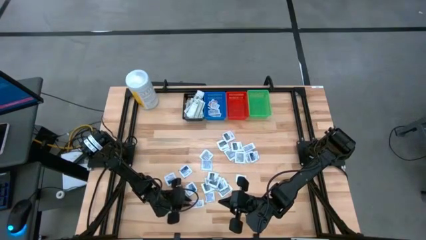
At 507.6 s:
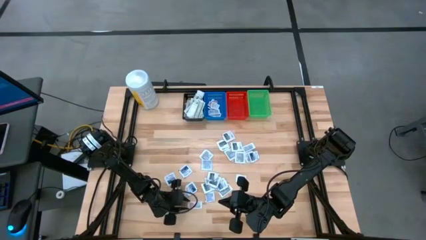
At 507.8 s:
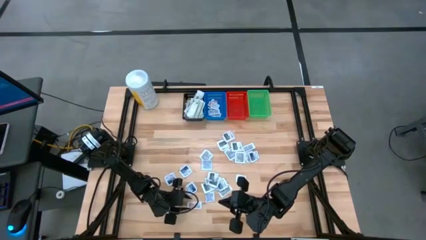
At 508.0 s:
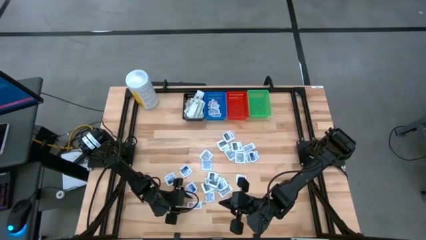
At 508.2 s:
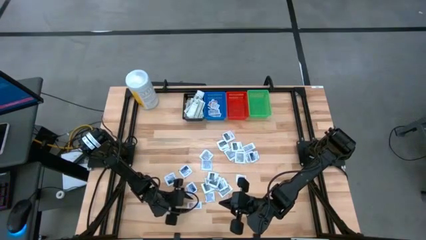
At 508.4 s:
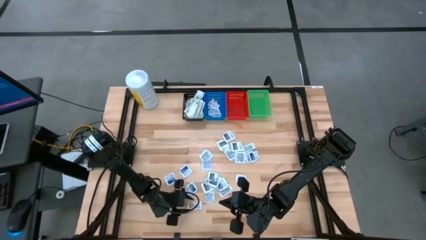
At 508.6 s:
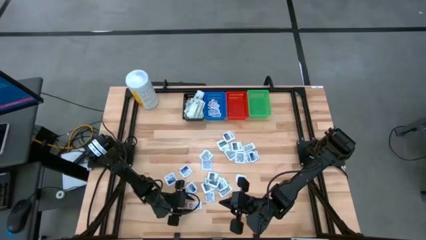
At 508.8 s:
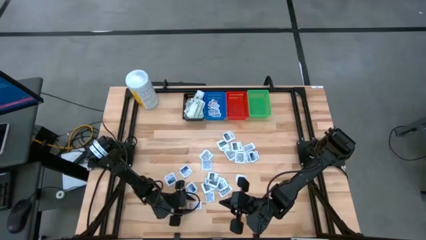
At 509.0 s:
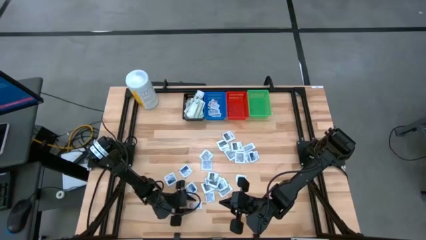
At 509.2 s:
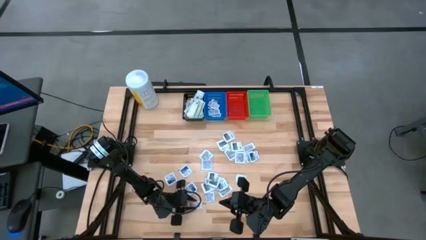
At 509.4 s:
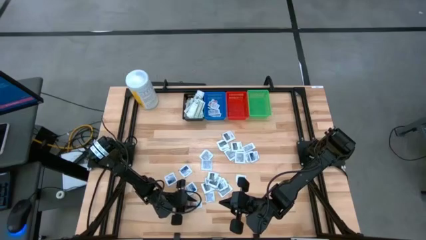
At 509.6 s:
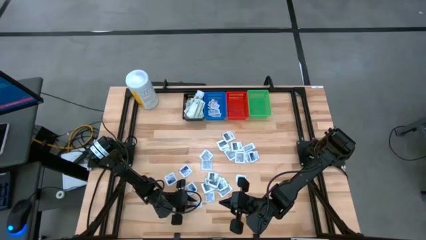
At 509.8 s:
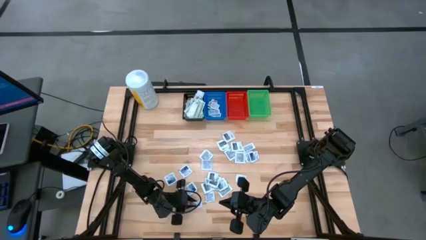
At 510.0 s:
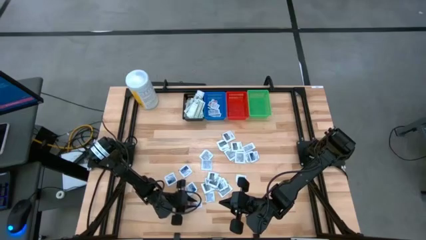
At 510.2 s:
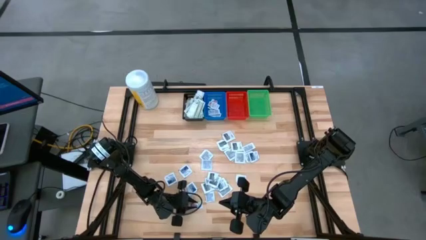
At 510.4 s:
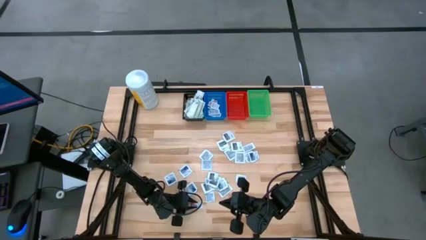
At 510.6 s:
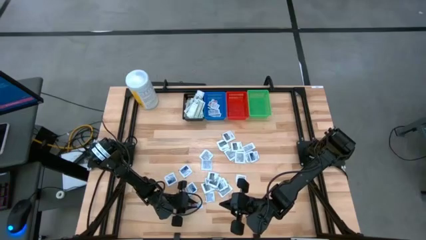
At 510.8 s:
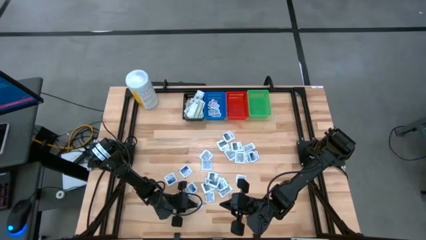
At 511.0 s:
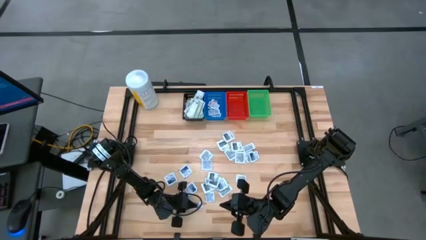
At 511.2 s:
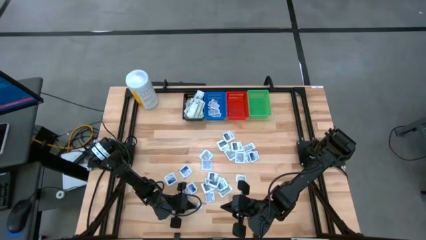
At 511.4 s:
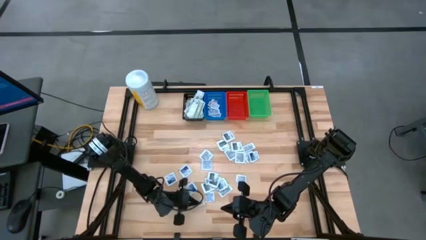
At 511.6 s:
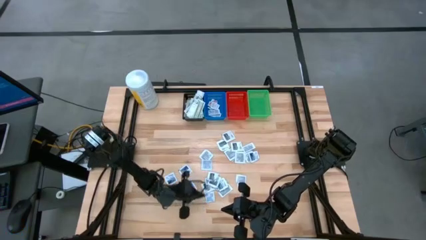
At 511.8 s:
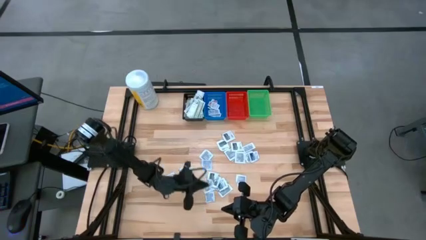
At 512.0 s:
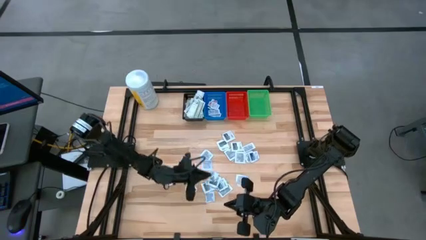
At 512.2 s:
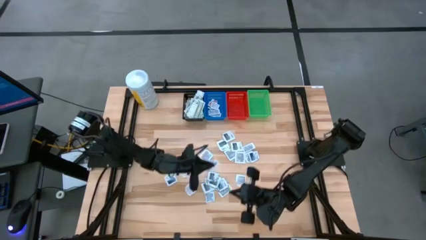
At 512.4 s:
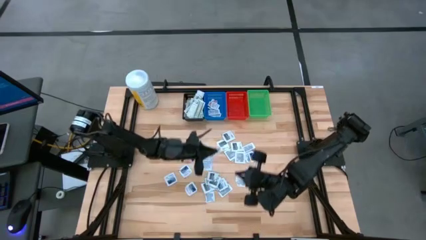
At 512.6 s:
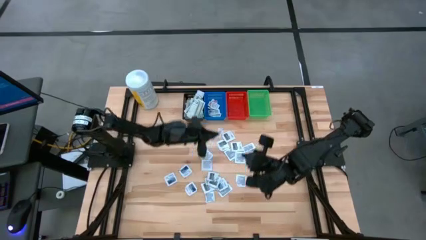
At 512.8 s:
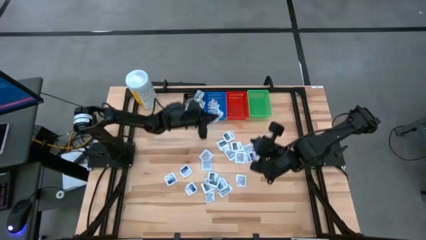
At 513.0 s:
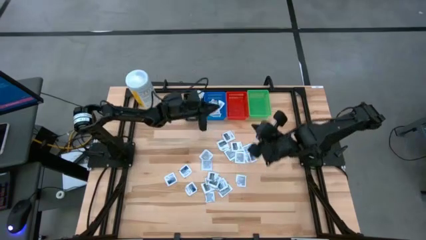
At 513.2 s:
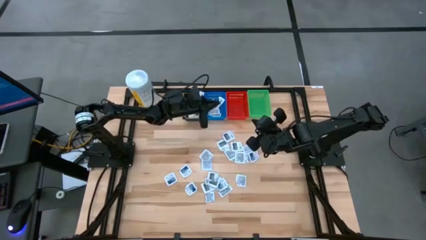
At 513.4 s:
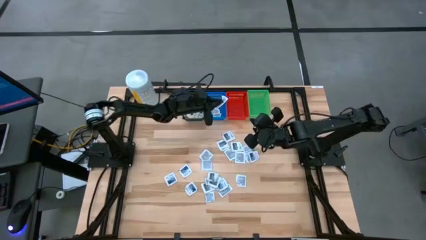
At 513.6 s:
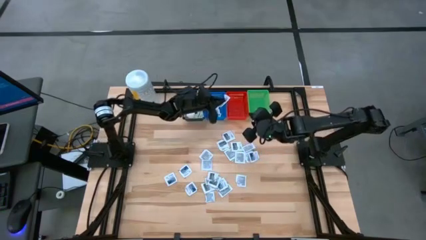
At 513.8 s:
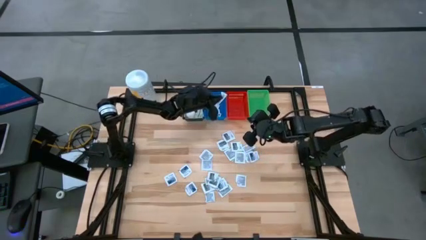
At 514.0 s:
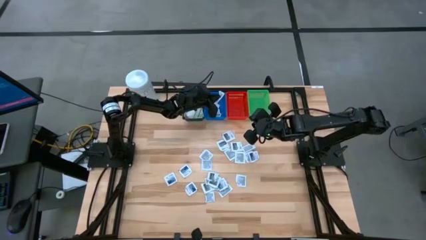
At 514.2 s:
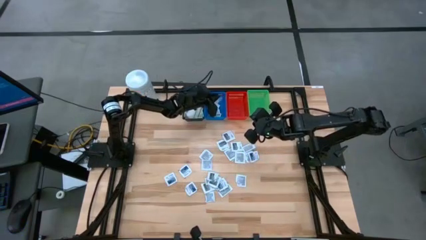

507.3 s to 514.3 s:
Task: Pick & Place First Aid Supplies
Put the orange ointment pack in the blue bin

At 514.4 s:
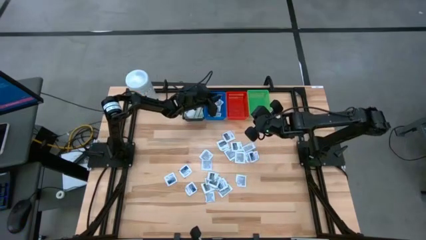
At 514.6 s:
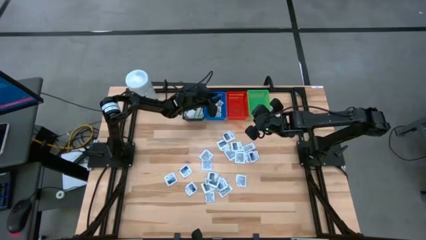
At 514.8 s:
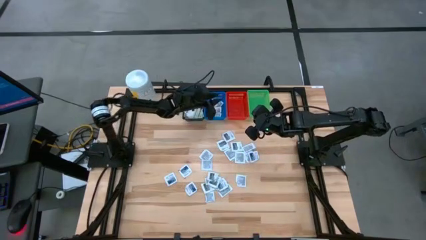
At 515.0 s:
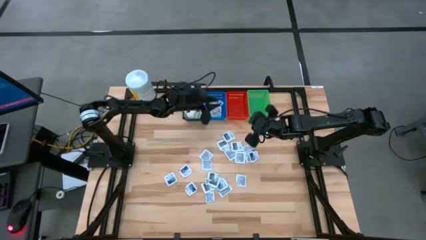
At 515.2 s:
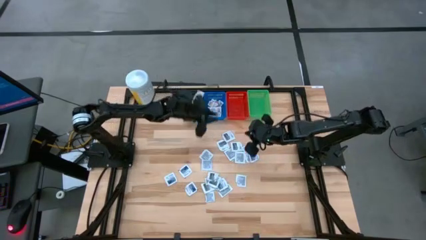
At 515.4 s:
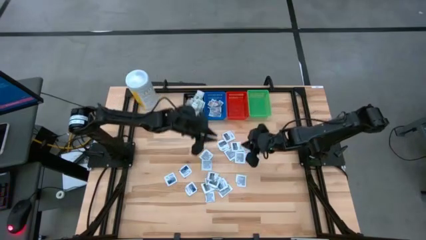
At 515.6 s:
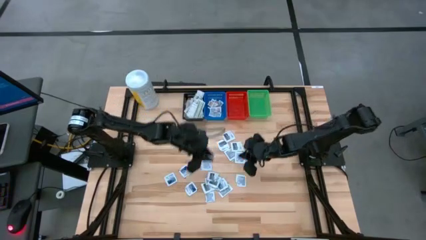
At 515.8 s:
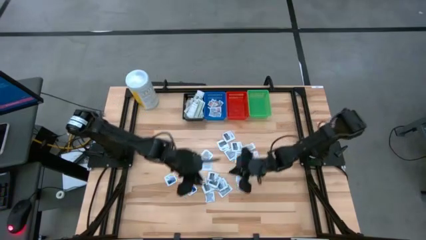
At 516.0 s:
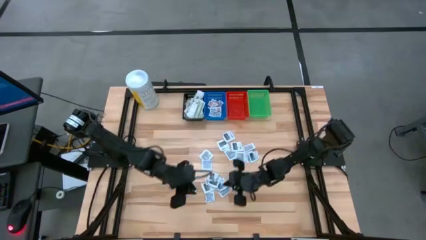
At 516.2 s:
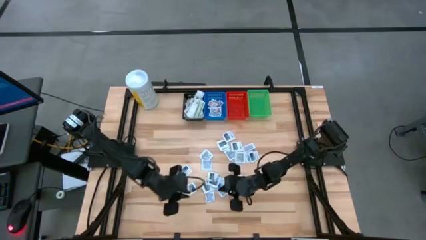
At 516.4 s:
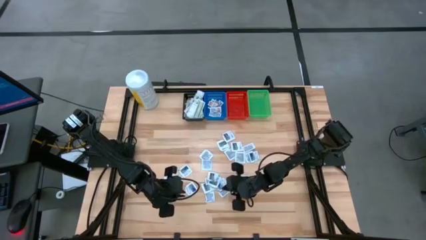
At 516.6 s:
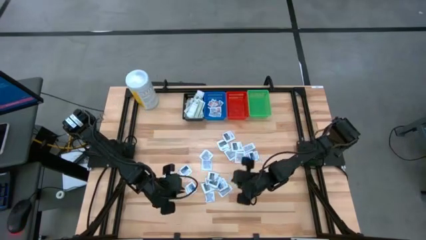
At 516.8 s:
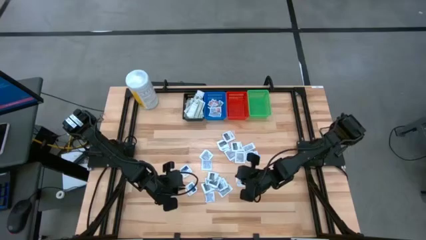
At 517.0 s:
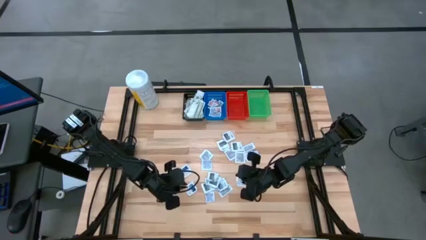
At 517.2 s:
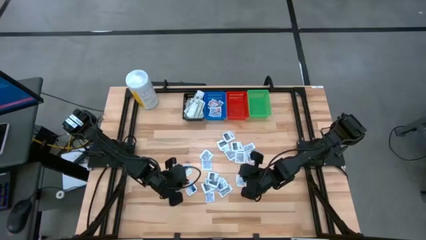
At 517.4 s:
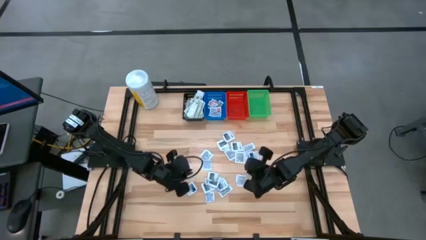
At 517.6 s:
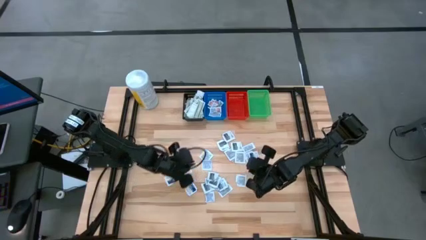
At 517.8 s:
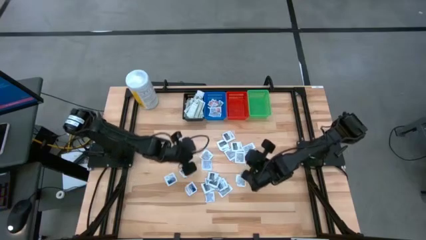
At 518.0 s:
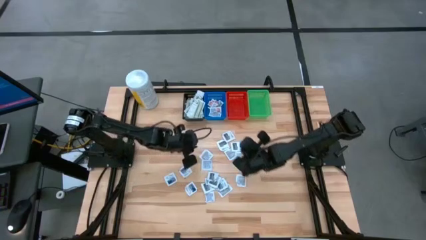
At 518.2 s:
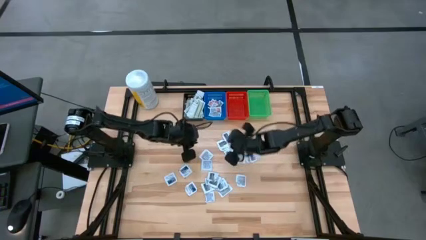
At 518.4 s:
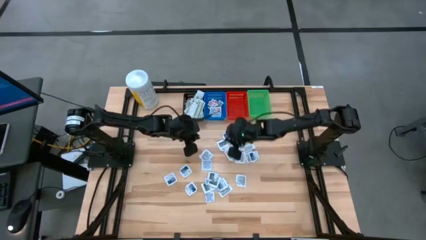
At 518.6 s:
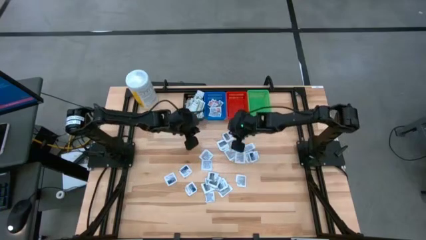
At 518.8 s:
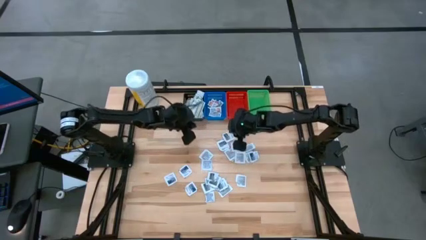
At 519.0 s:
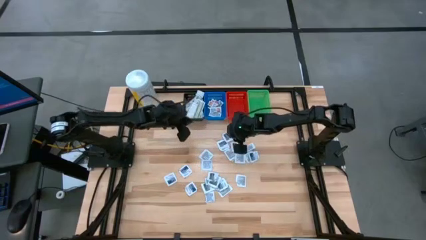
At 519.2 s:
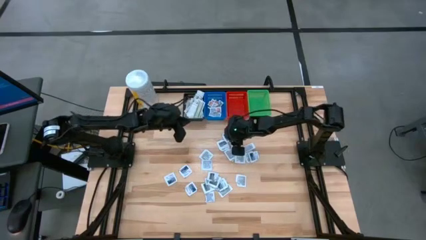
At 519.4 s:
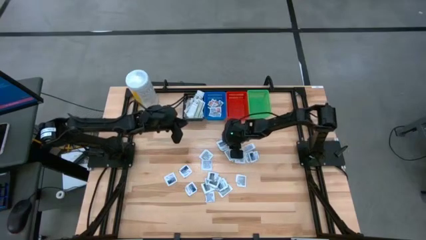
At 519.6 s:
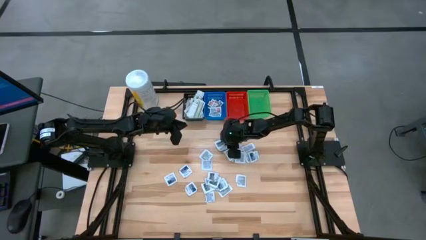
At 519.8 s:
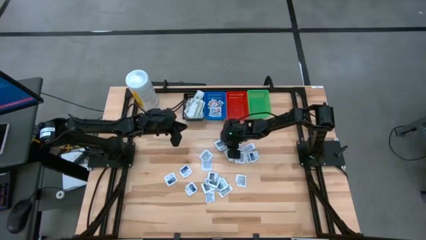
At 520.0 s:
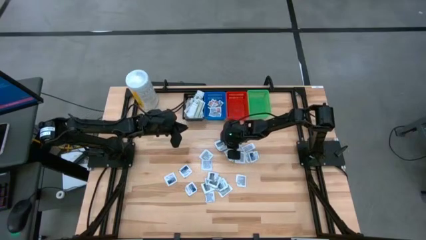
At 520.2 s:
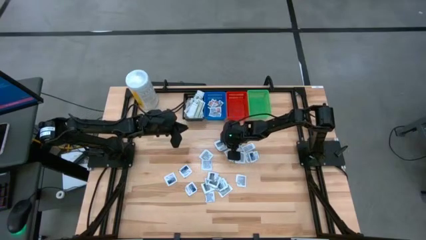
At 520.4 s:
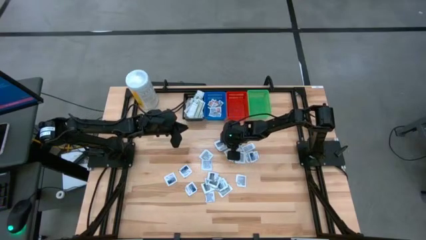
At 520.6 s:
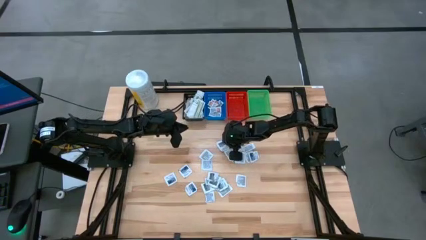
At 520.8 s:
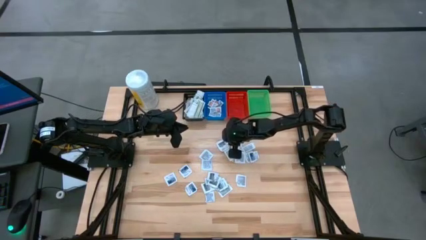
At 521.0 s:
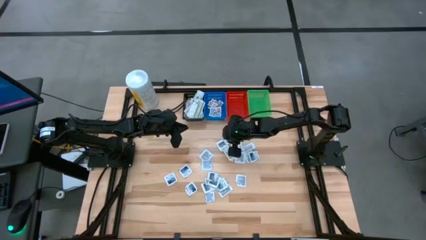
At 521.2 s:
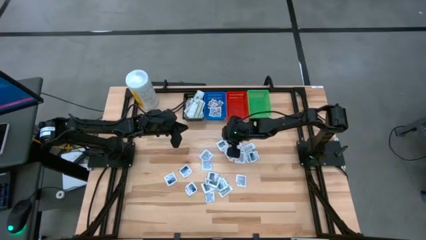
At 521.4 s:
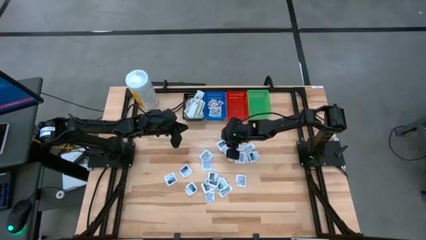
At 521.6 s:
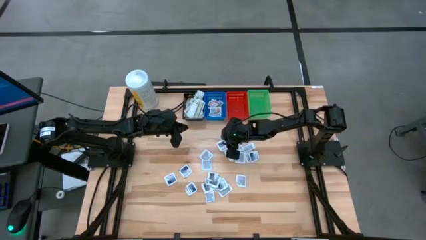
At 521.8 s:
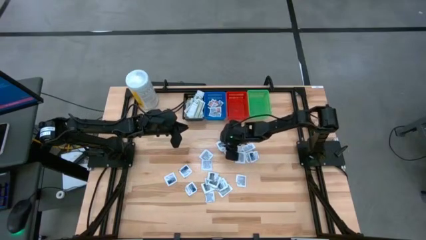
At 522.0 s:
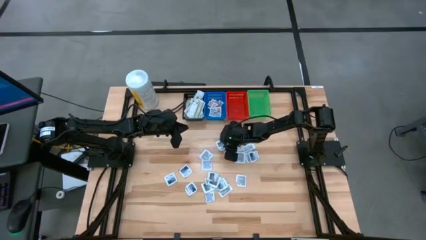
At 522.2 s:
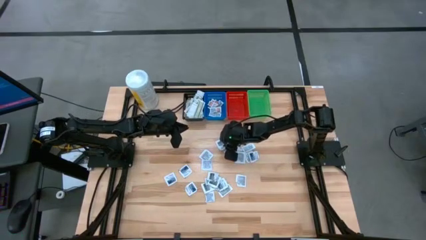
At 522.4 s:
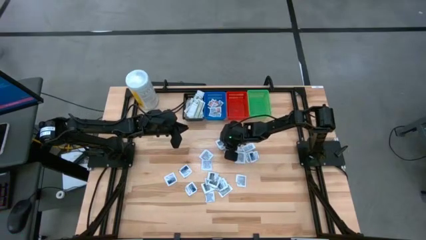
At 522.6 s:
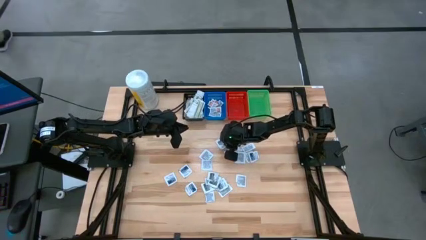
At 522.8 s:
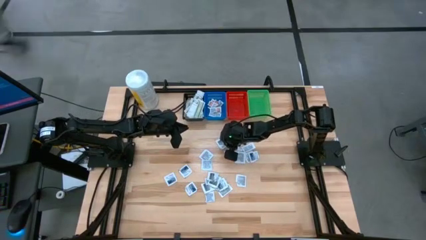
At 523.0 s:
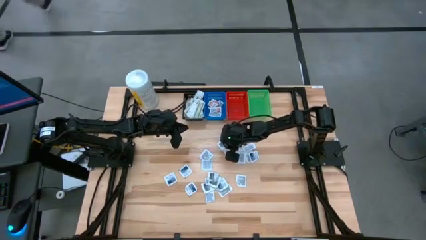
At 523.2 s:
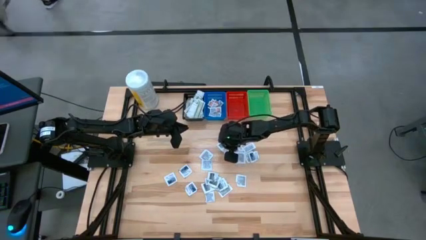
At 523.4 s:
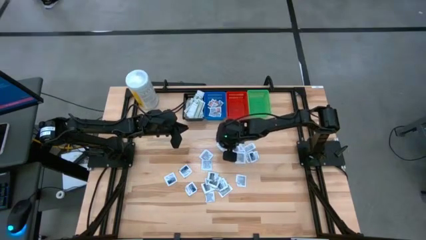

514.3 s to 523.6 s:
Put the gray towelette pack in the red bin
